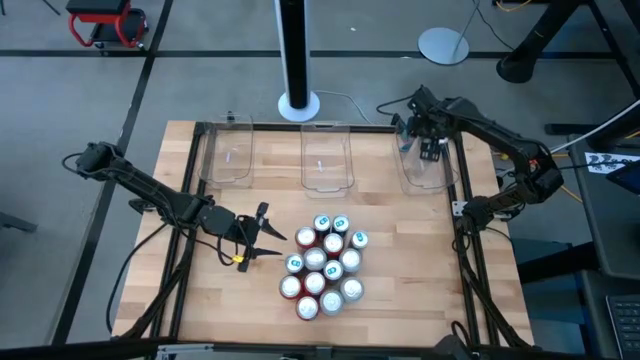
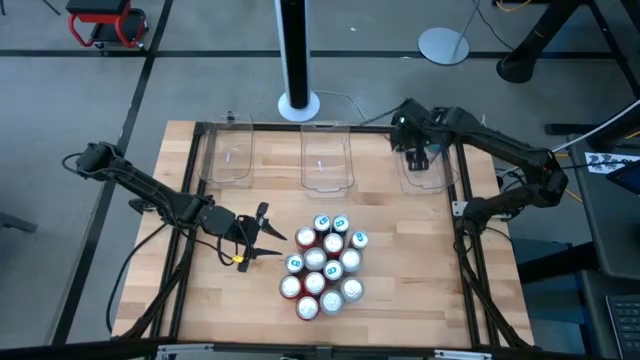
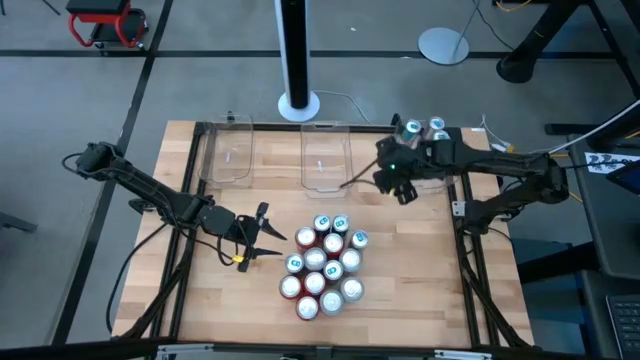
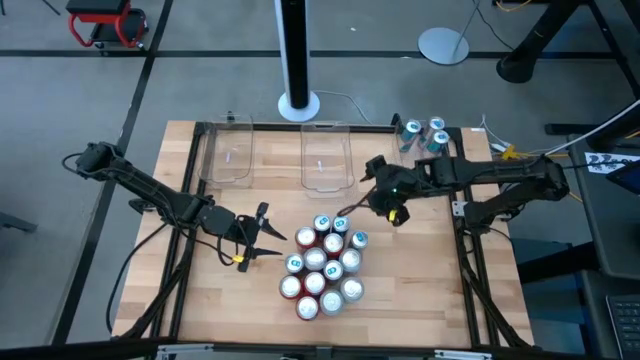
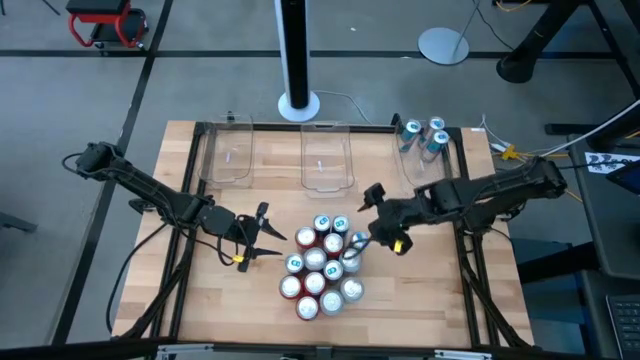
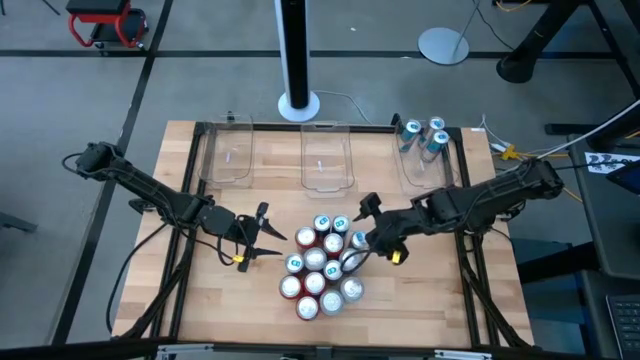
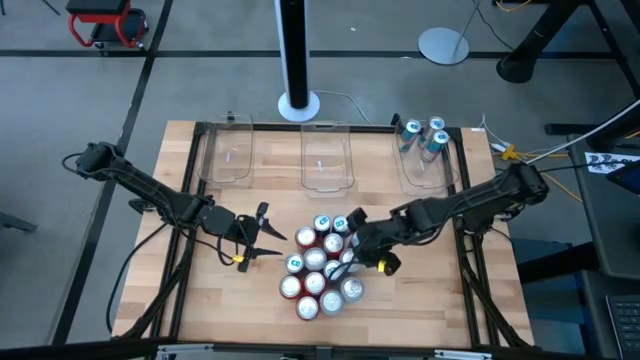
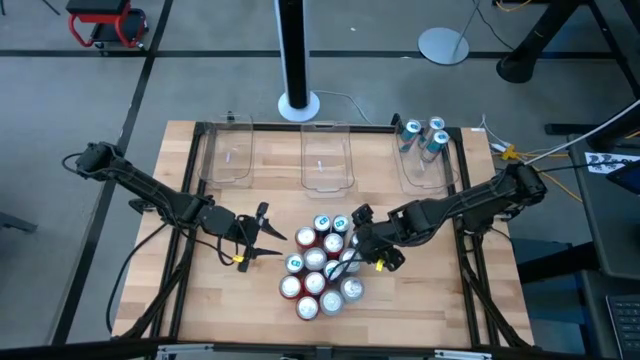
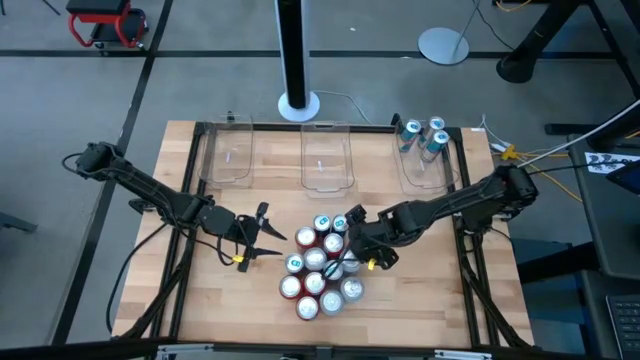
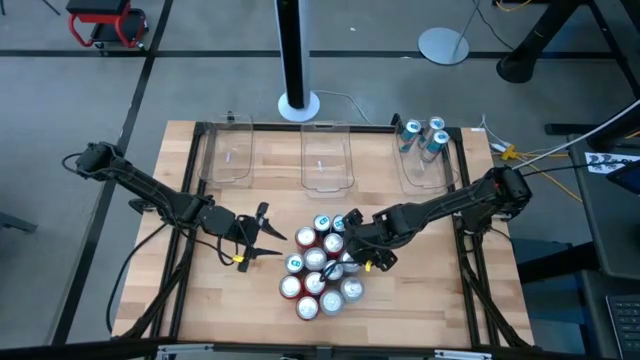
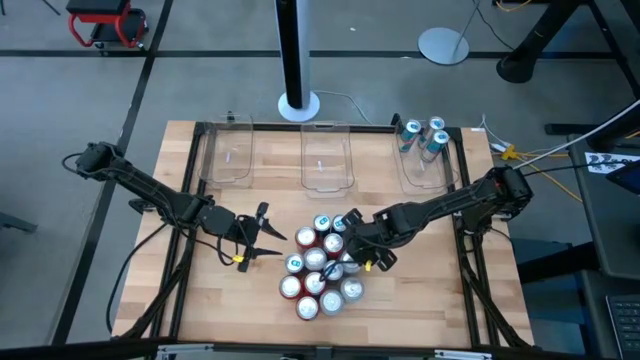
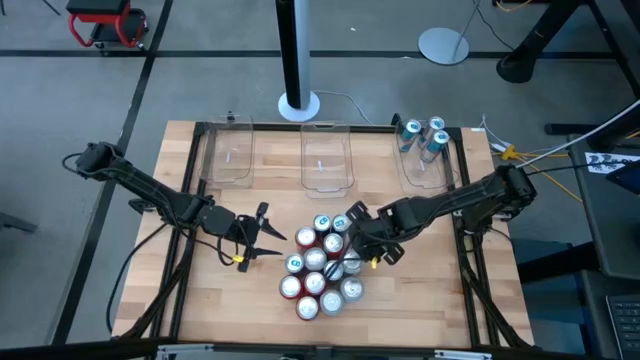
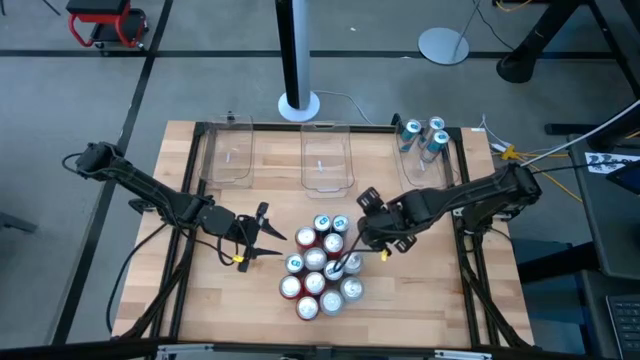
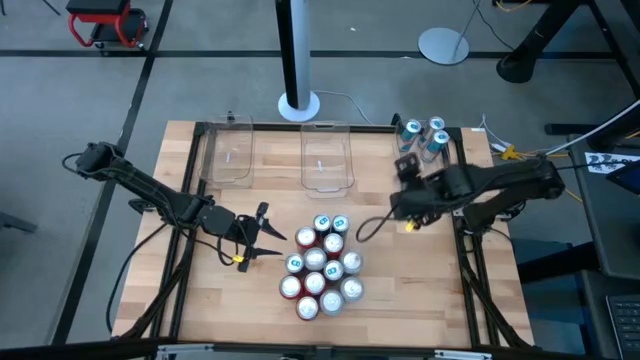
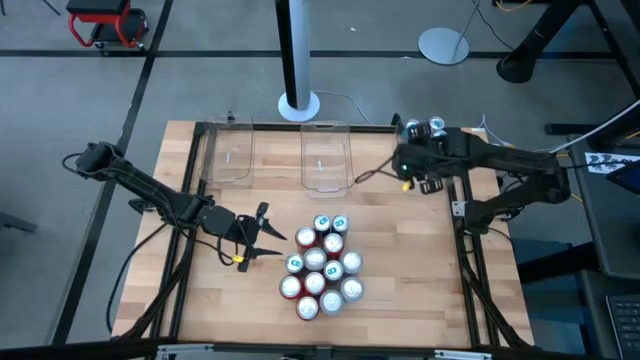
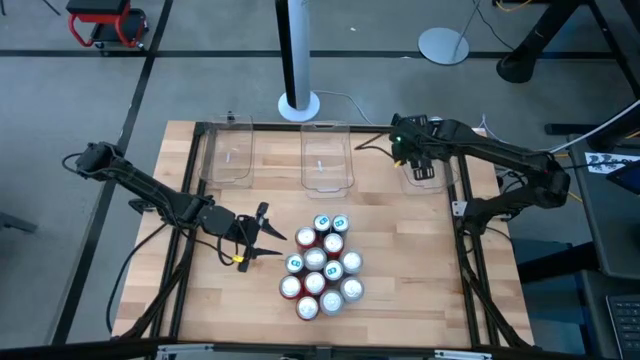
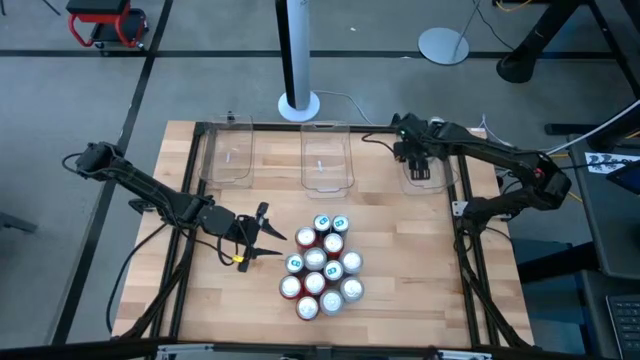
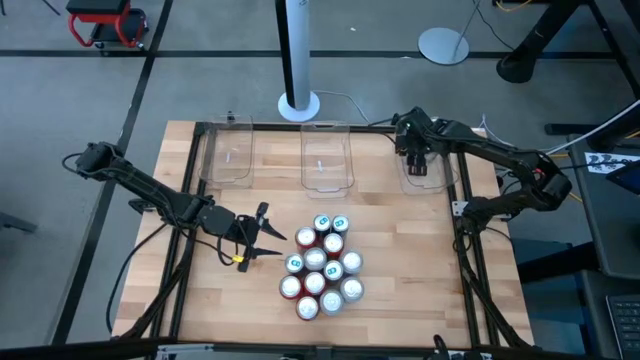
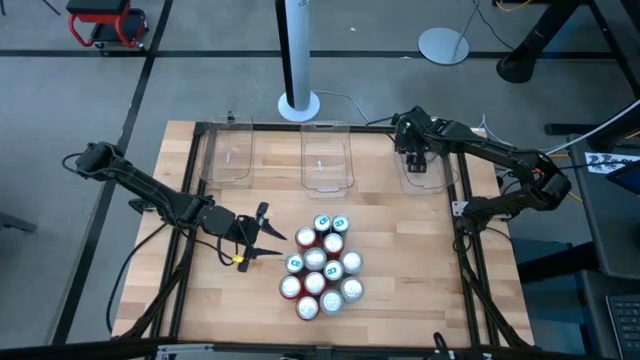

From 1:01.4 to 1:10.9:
Task: Sort soda cans
Put the blue soda can into the top right transparent bin

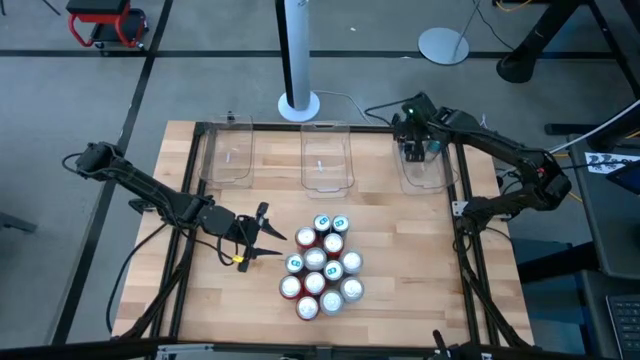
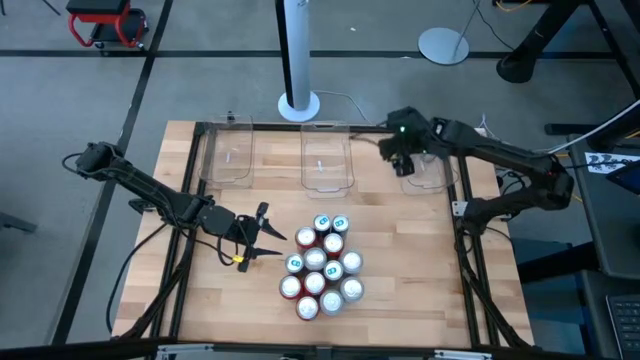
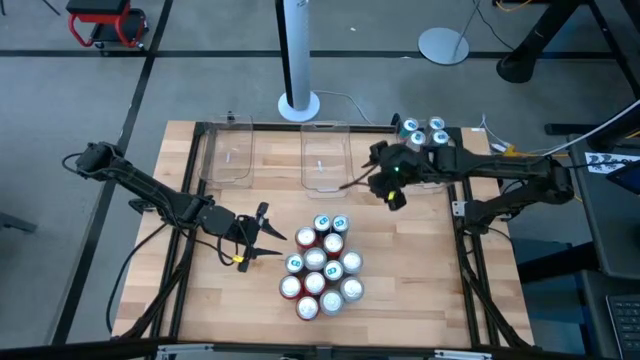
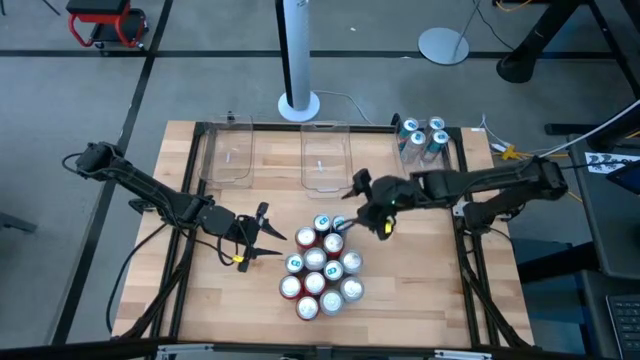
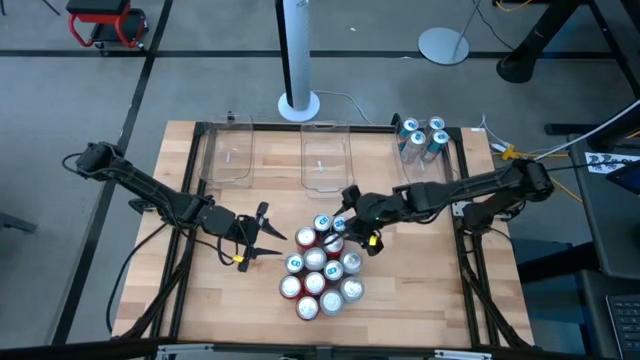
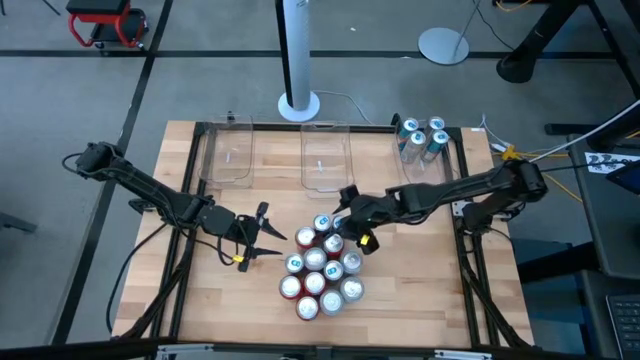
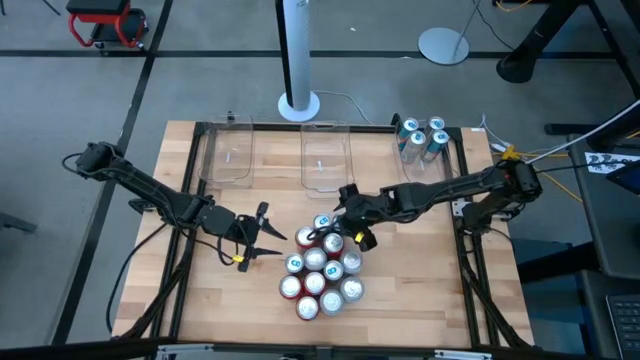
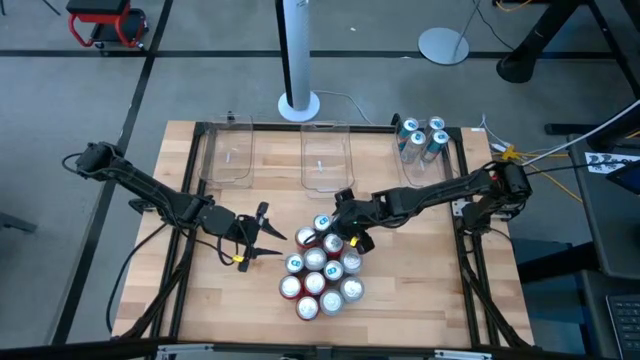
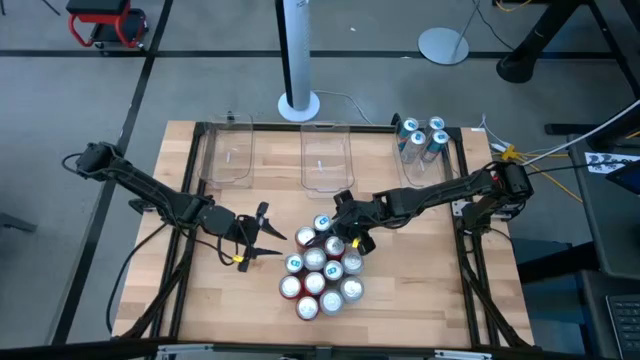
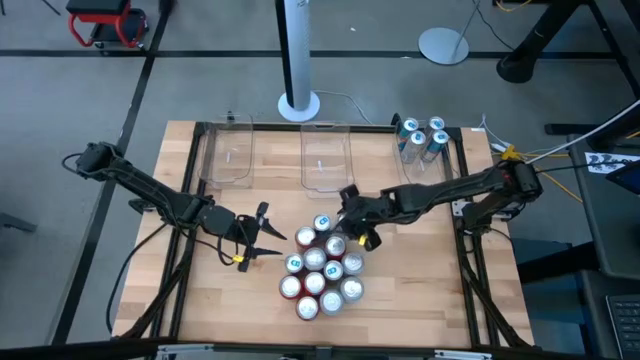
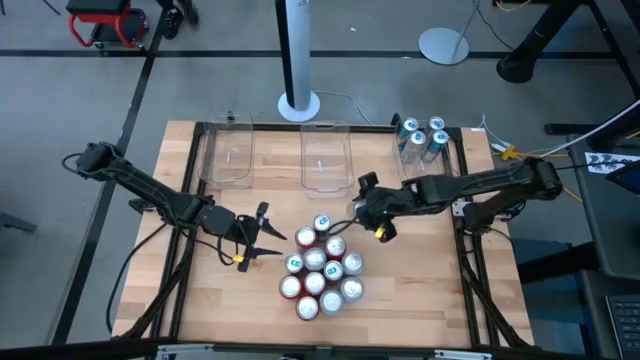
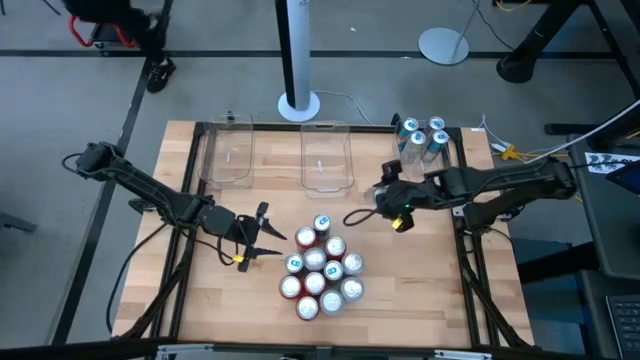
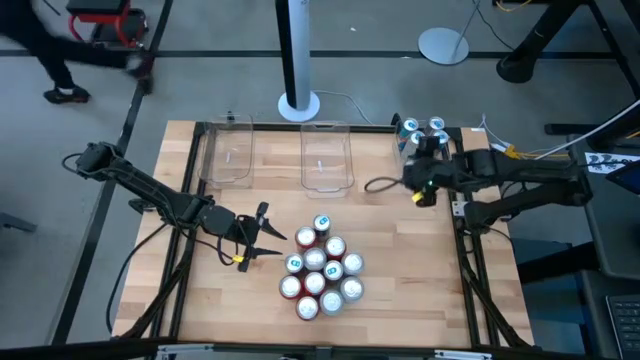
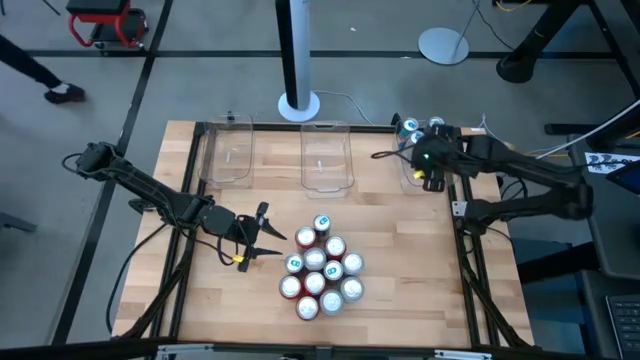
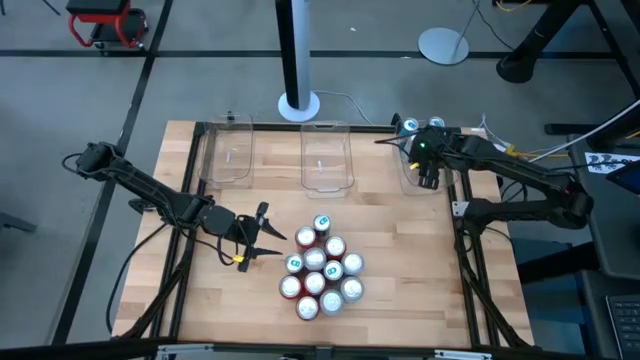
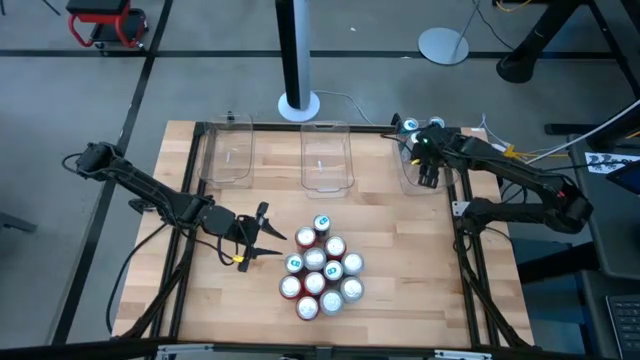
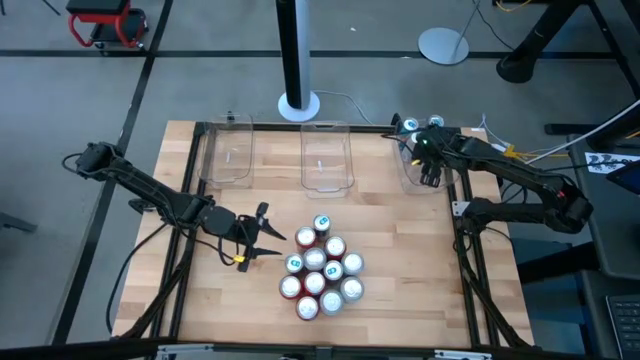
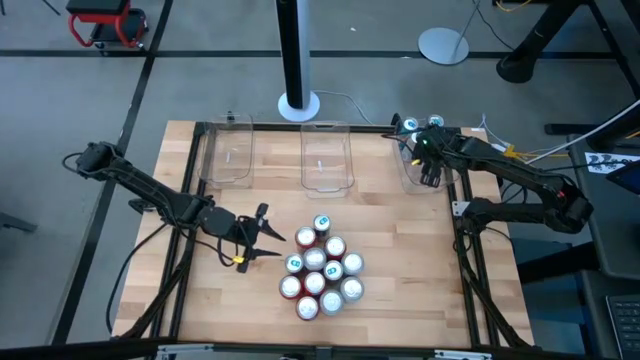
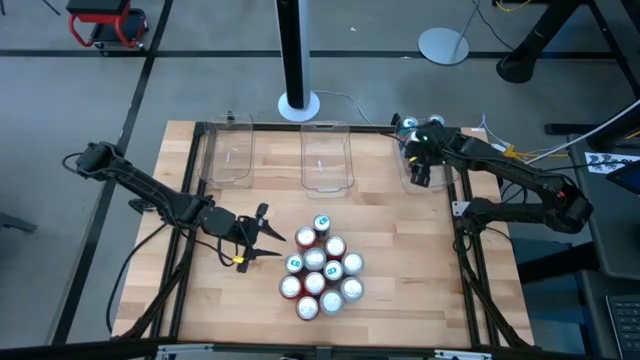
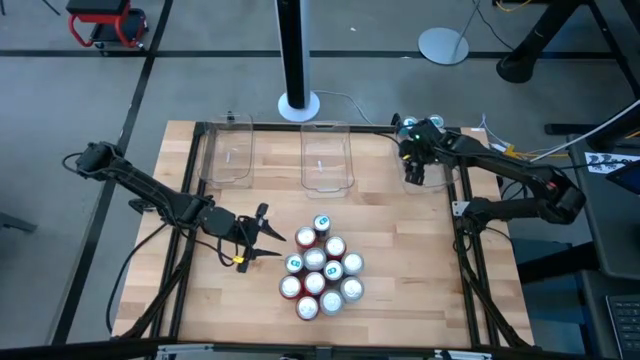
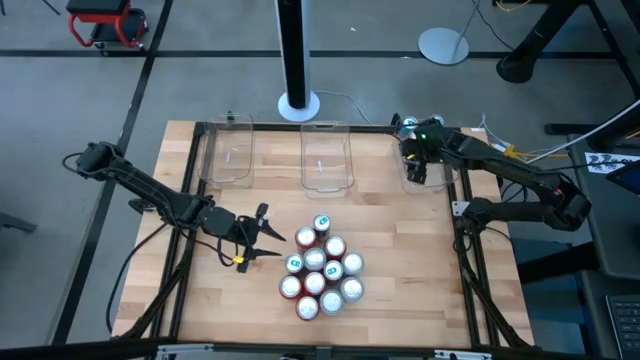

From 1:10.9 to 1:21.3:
Put the blue soda can into the top right transparent bin

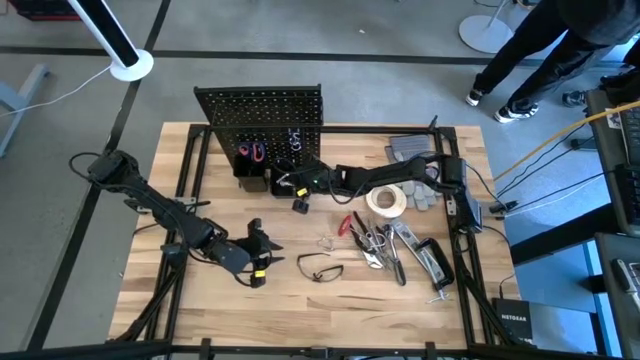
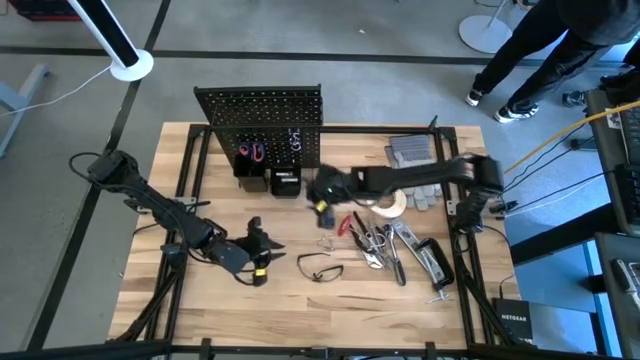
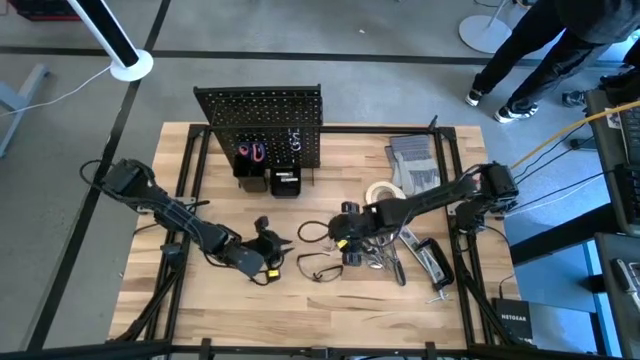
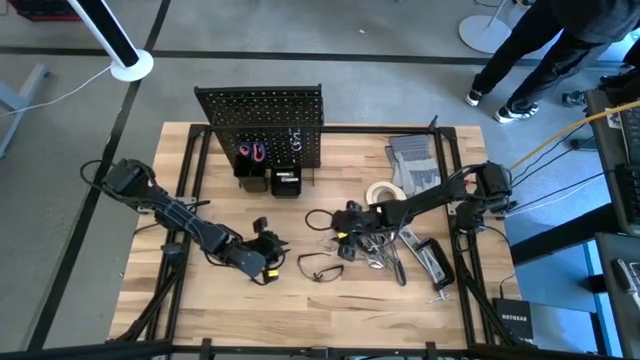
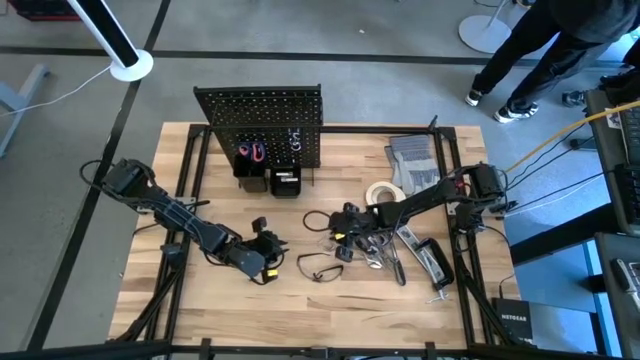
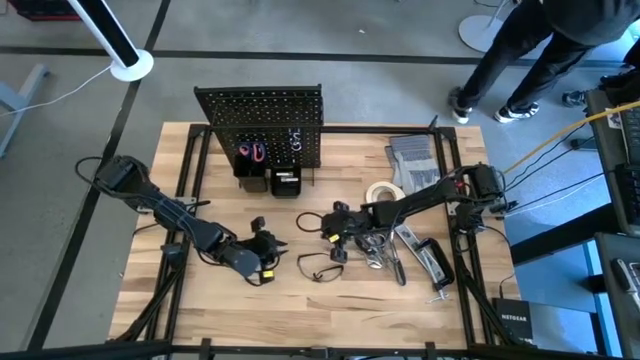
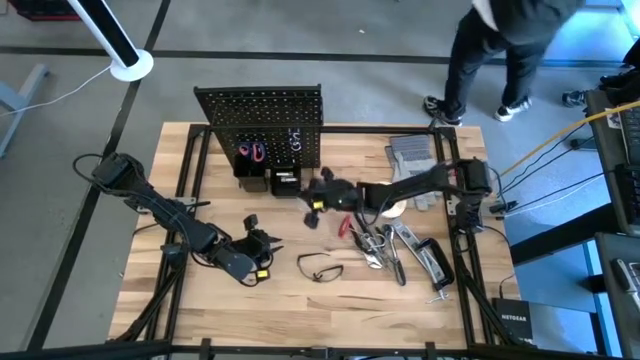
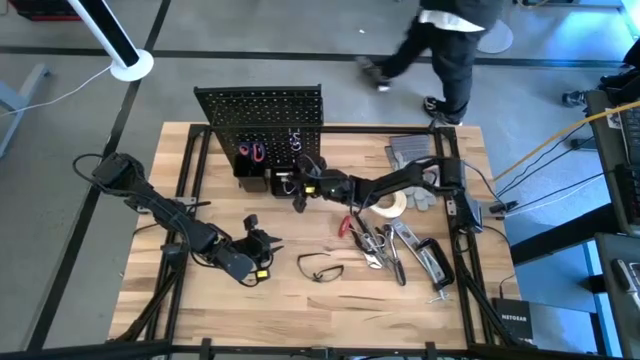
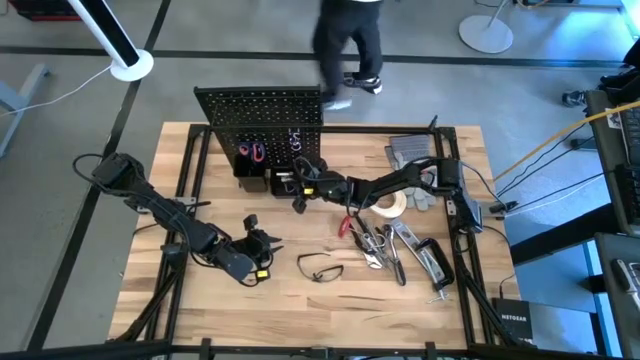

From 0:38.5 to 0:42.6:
Task: Hang tools onto peg board
Put the binder clip into the right pegboard organizer bin
